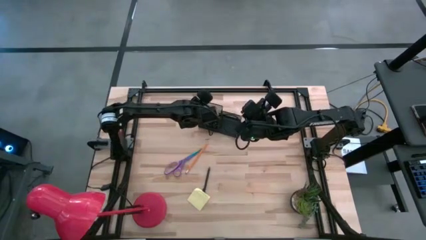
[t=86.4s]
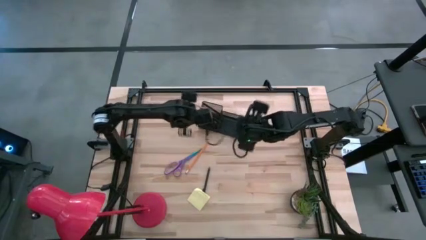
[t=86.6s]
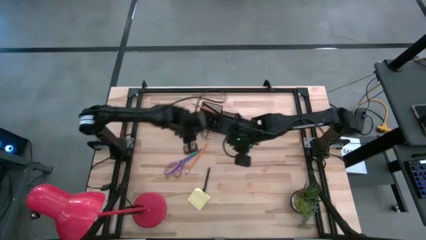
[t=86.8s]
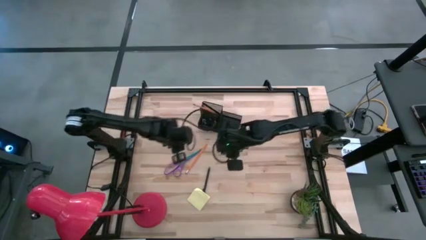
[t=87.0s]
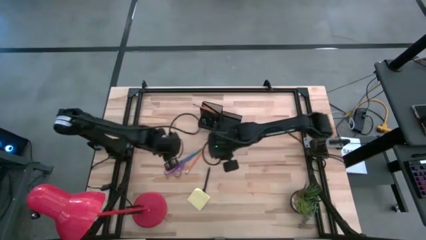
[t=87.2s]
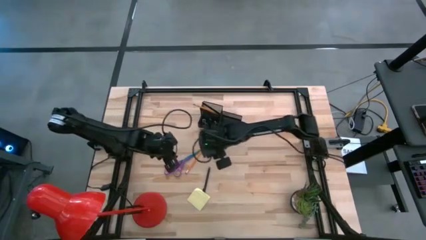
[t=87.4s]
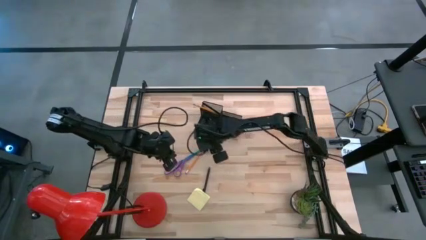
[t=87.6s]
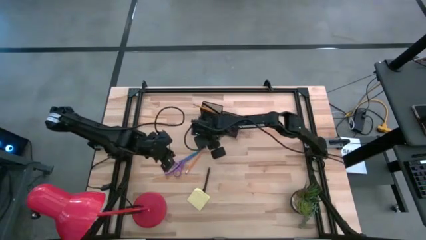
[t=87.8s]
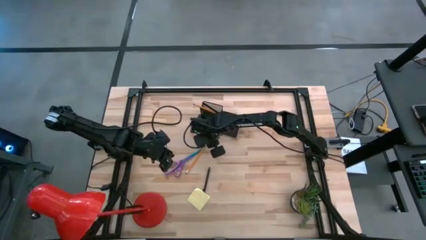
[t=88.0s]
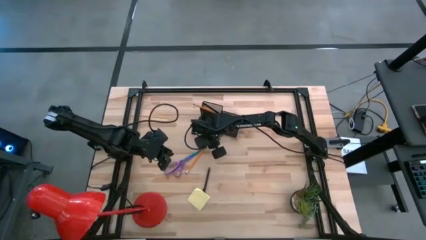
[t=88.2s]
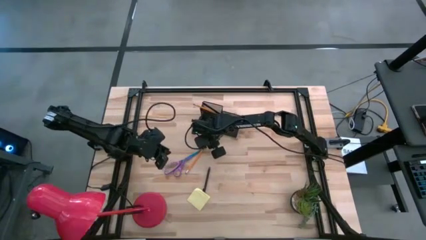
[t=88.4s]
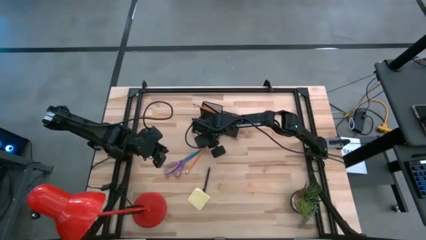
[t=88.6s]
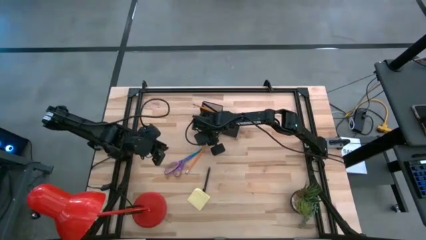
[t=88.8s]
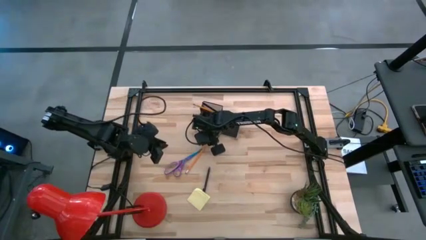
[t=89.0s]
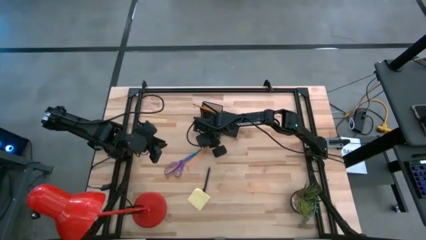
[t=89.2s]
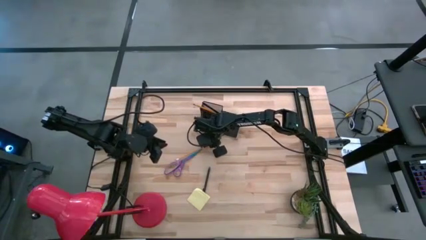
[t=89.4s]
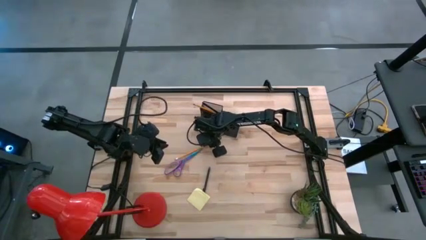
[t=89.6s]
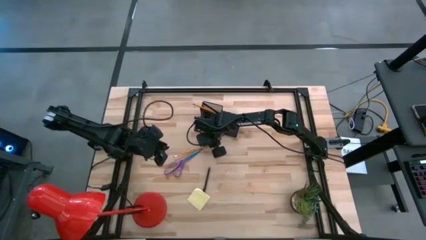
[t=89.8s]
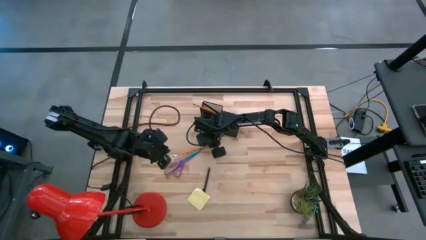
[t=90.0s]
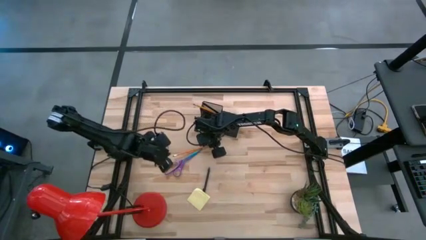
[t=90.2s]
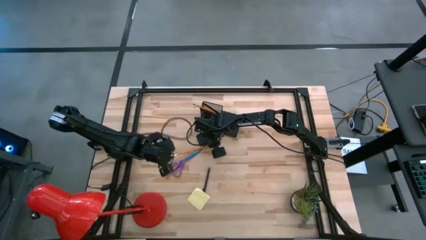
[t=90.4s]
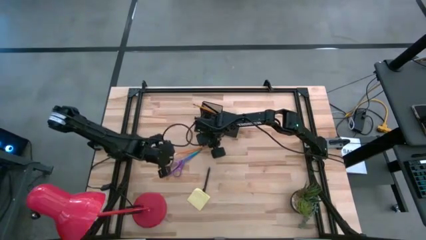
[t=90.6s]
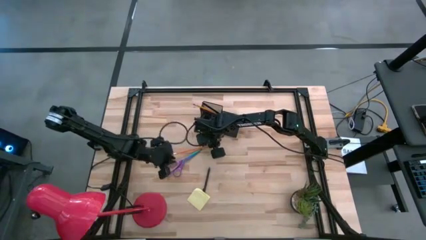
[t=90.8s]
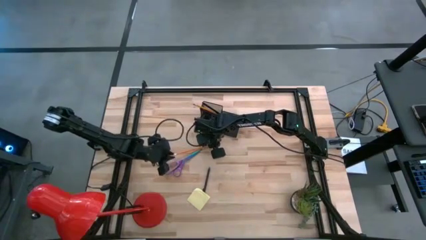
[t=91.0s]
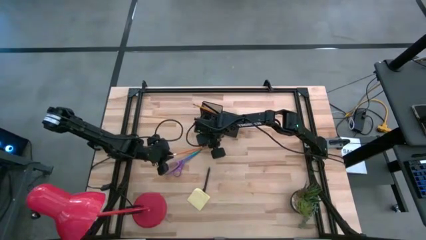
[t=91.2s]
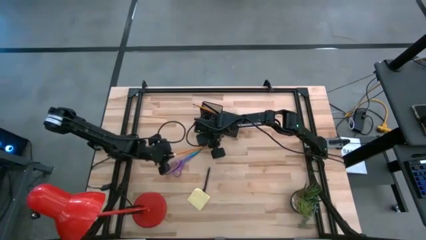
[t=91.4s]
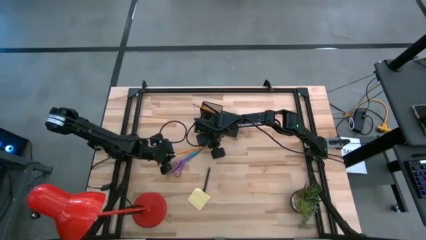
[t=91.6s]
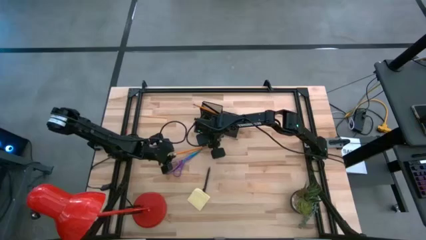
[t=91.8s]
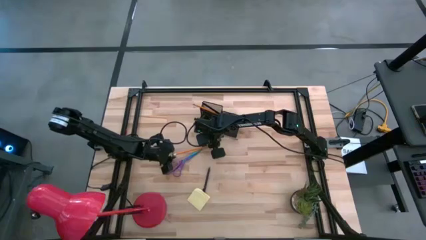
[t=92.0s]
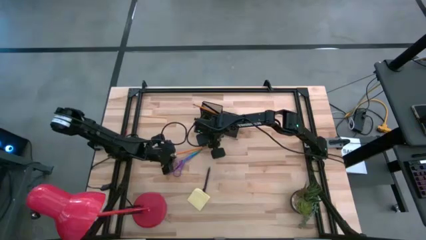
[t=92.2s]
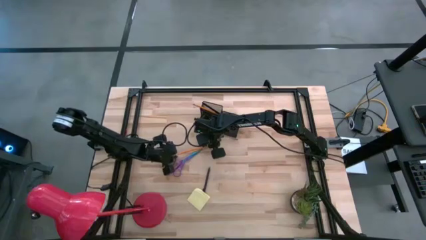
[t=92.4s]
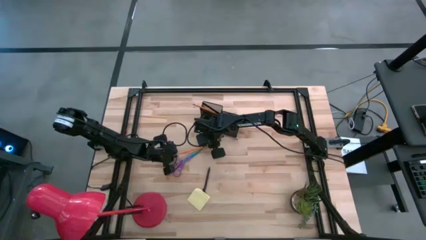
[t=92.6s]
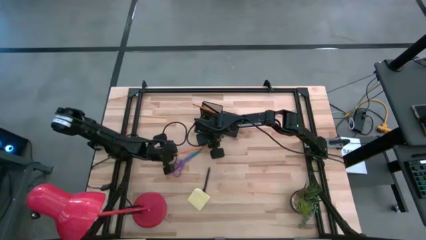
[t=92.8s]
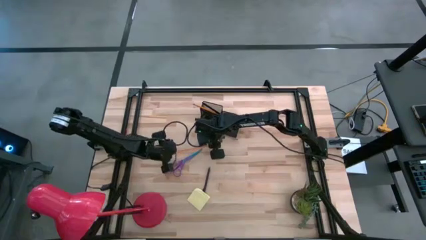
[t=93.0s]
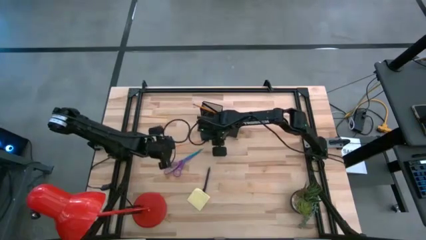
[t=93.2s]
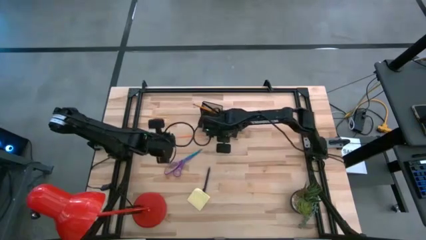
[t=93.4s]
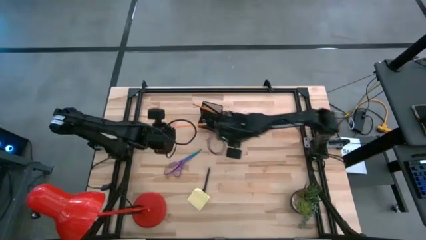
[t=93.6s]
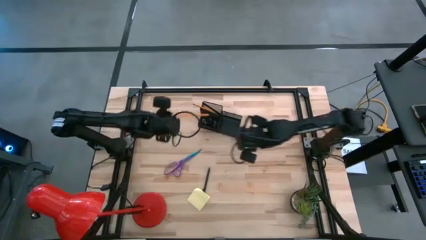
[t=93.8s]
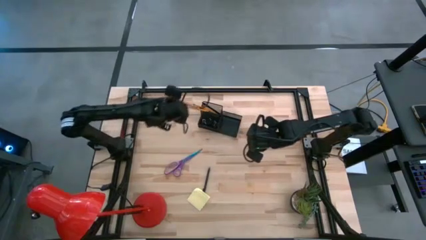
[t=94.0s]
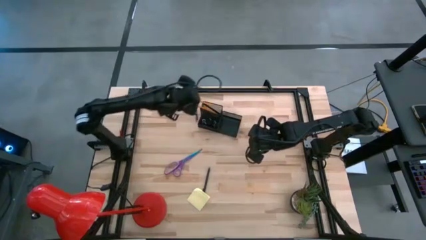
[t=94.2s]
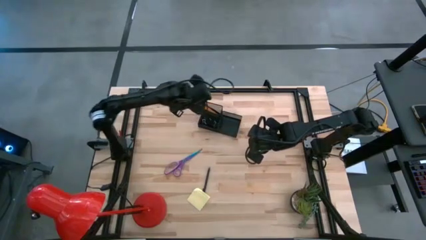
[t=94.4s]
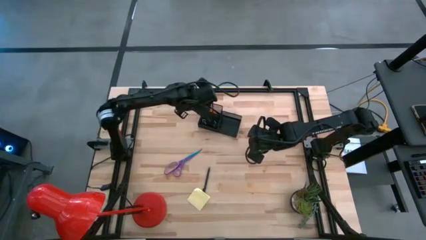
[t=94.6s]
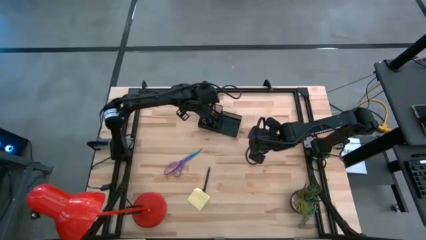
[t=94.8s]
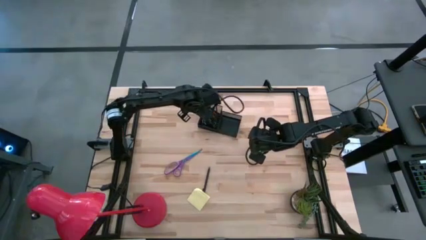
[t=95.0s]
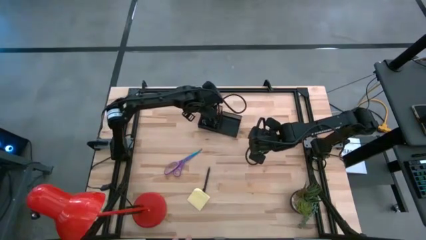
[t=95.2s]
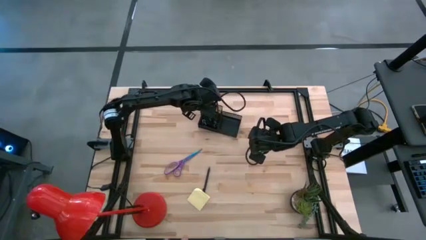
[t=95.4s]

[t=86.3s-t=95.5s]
Task: Pick and place office supplies into organizer
Put the orange pencil into the black desk organizer

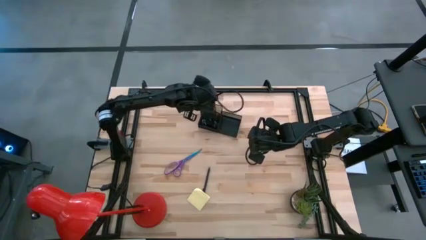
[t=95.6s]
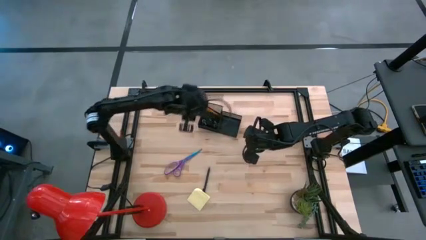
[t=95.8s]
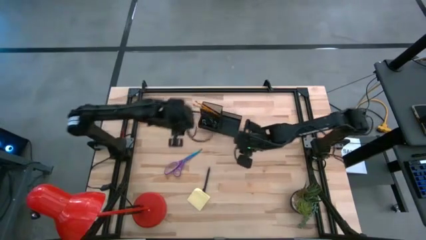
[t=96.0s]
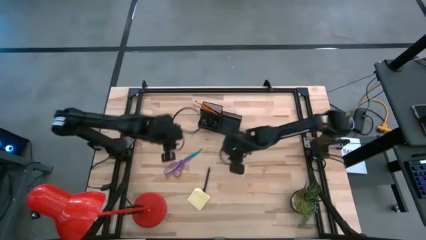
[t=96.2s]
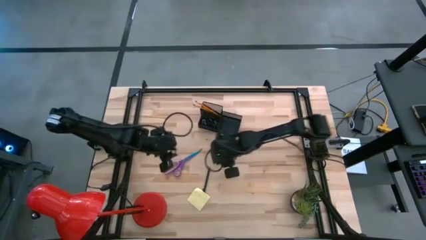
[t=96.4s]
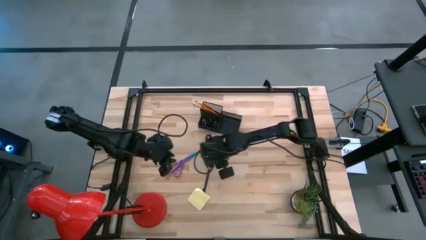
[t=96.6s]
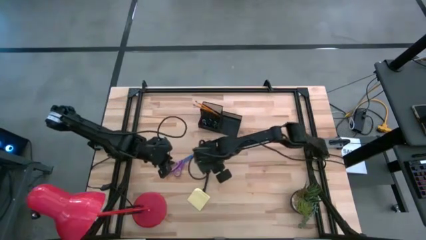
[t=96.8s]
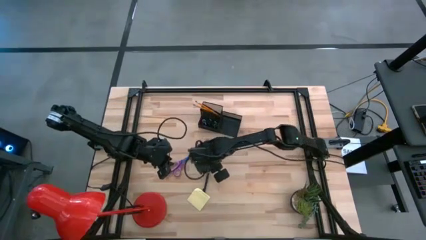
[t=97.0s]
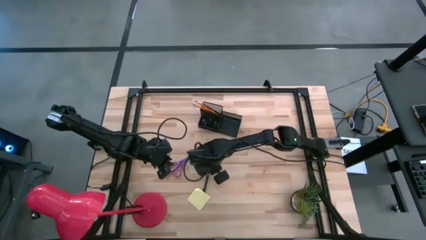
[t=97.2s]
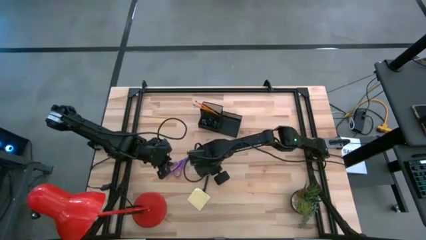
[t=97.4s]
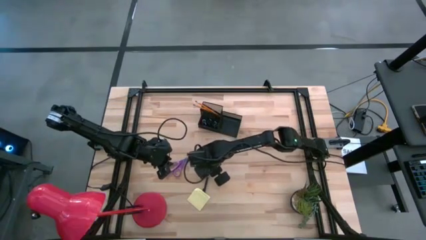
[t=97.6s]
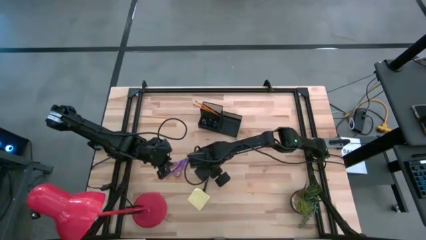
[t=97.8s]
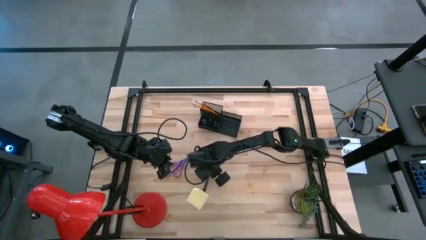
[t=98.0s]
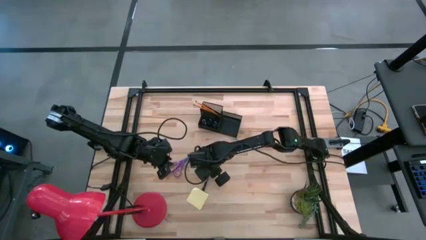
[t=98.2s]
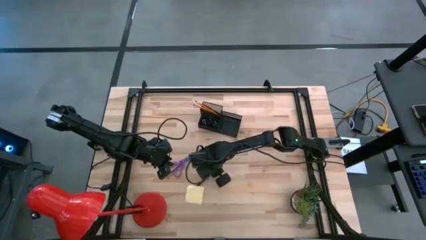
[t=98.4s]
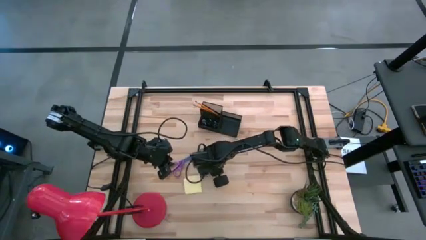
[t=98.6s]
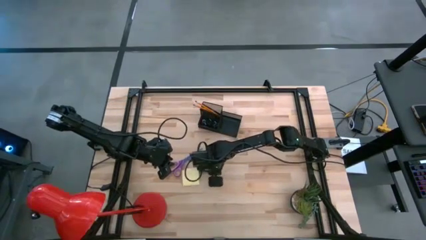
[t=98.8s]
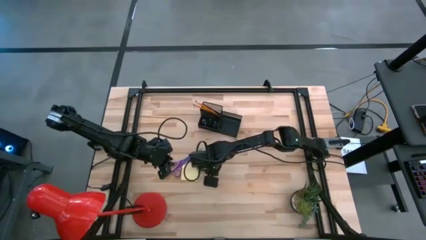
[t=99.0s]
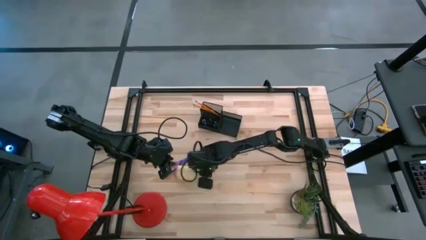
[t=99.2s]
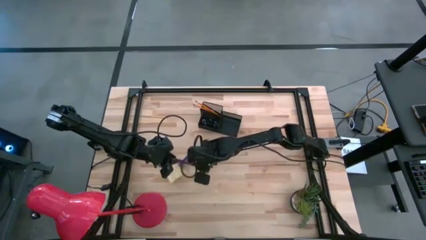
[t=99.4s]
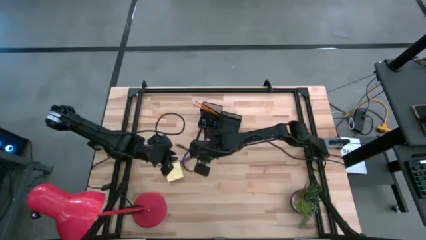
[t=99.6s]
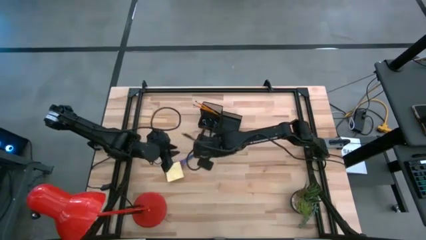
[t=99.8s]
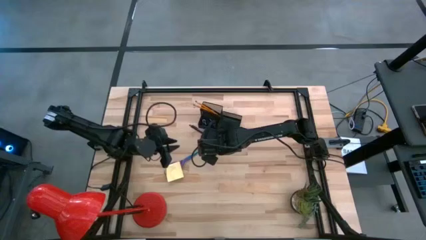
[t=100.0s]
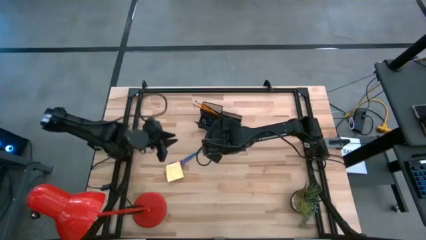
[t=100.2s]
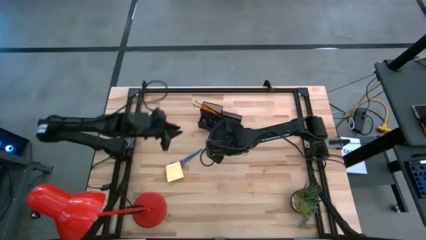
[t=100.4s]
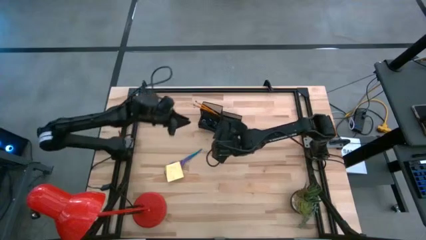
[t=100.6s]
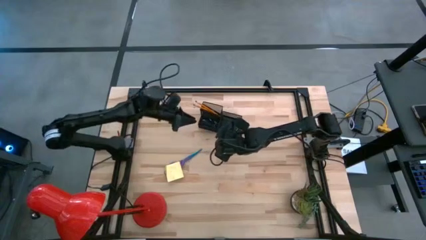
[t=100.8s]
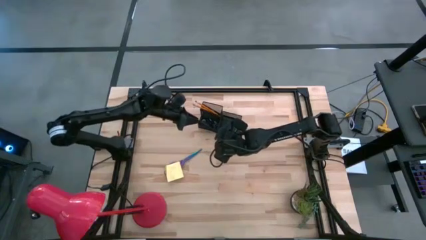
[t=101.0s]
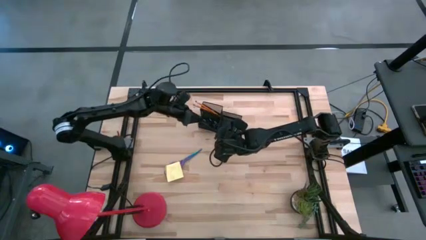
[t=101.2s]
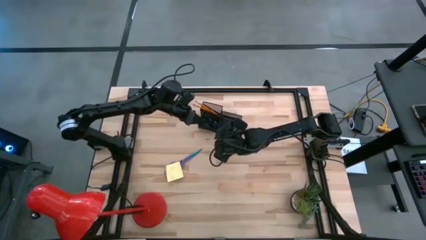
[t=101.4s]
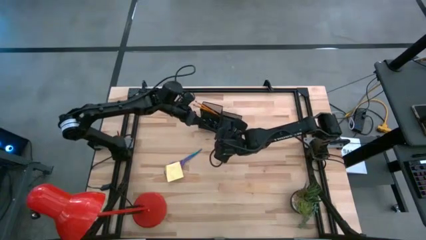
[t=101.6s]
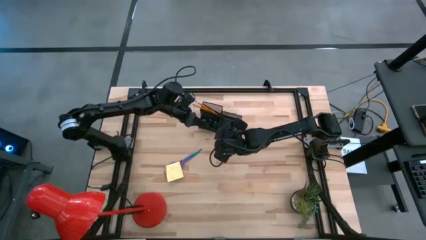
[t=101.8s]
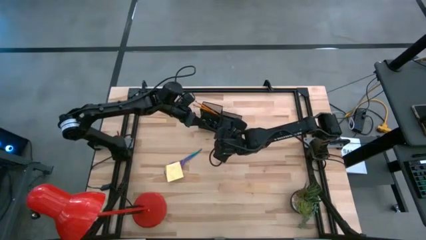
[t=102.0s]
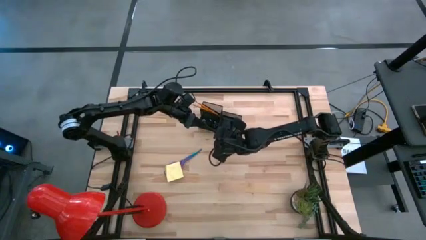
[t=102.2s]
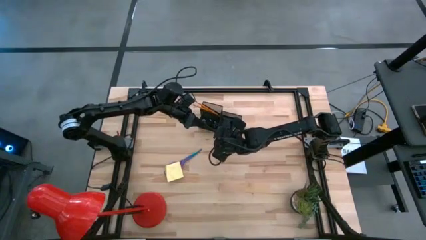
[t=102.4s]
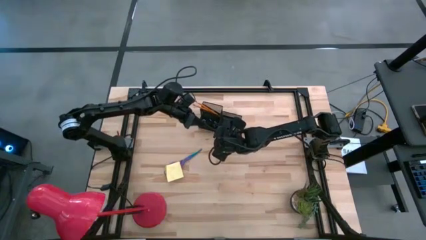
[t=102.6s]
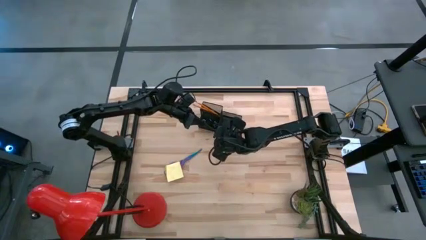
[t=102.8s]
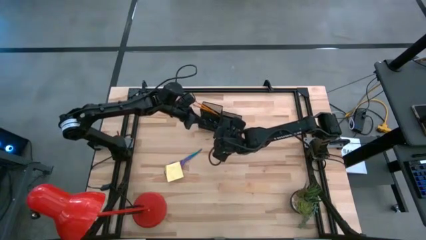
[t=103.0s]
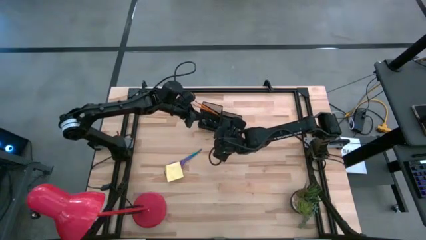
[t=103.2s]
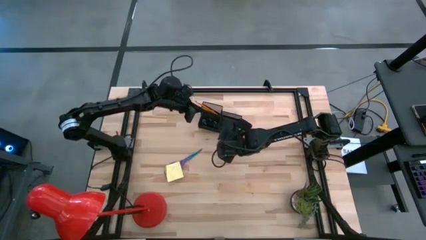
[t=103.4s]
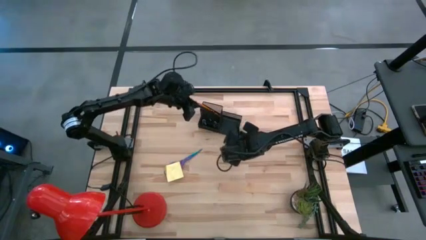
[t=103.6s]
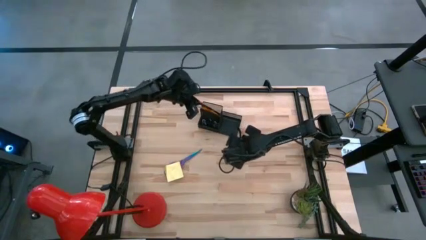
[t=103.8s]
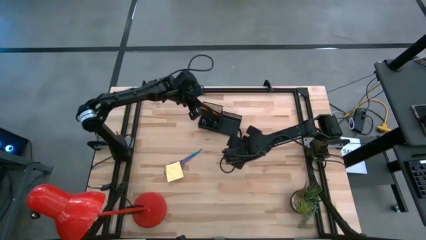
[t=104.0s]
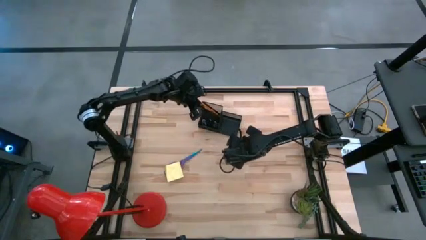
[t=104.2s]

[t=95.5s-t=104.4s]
Put the black pen into the black desk organizer
